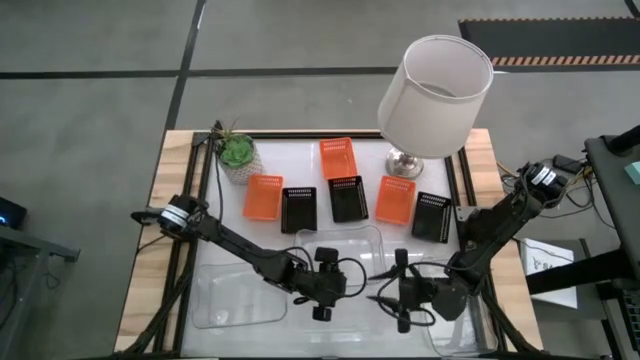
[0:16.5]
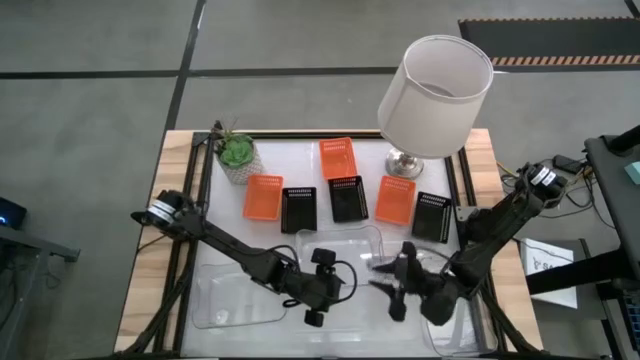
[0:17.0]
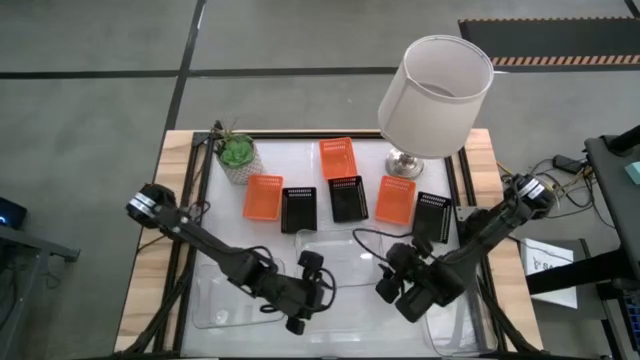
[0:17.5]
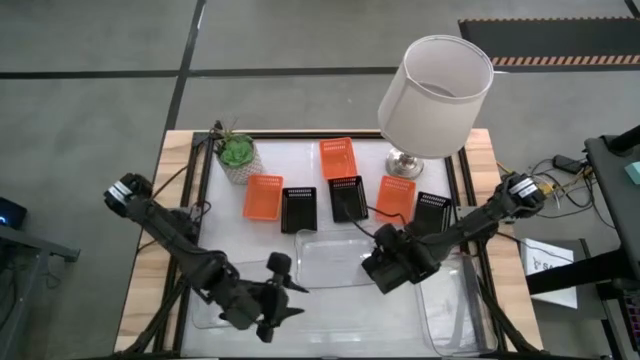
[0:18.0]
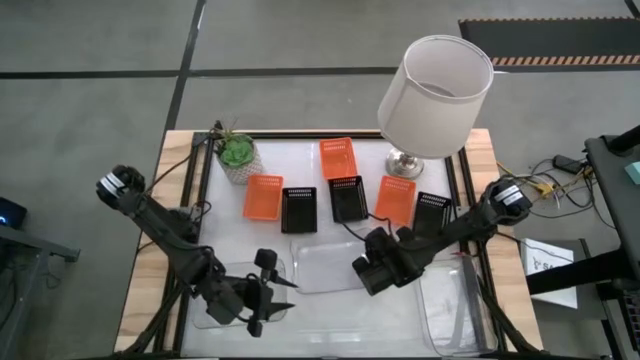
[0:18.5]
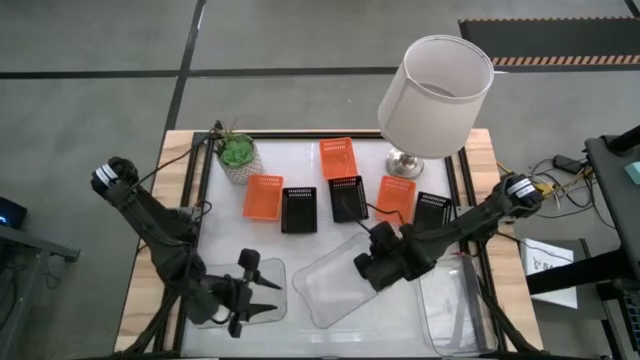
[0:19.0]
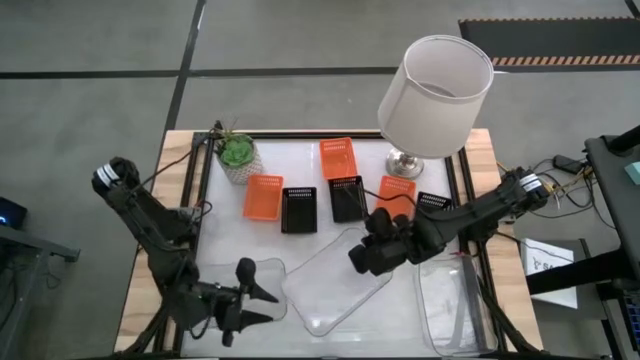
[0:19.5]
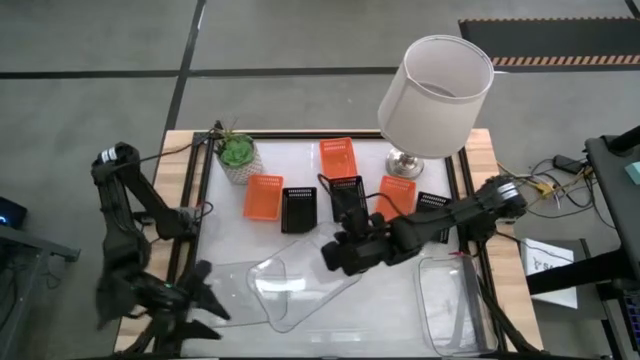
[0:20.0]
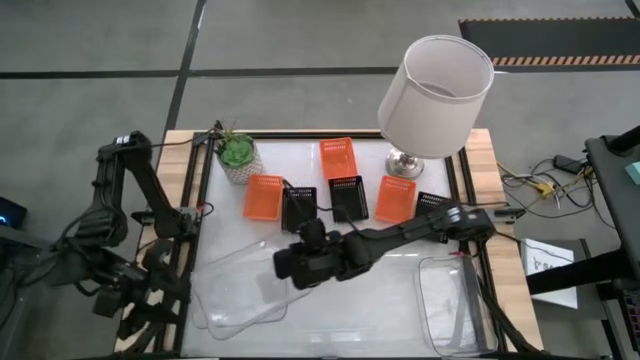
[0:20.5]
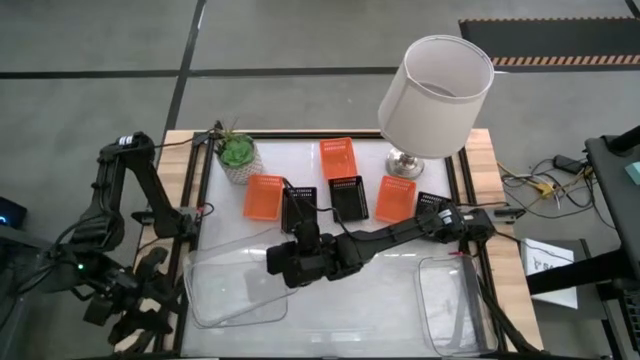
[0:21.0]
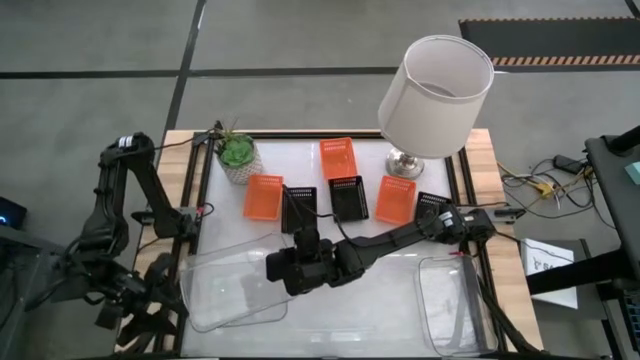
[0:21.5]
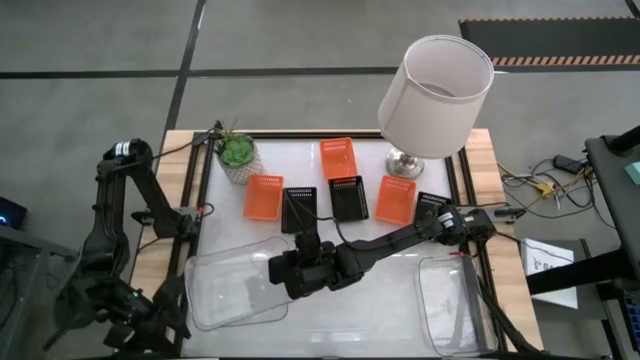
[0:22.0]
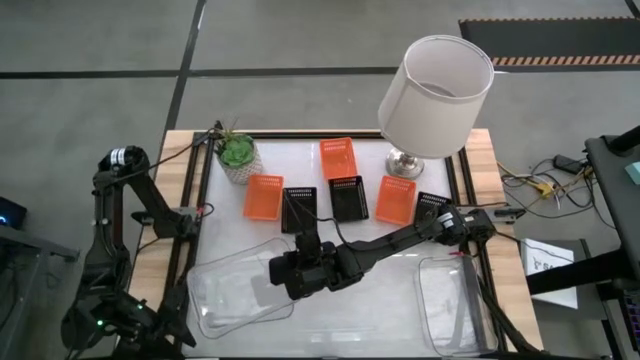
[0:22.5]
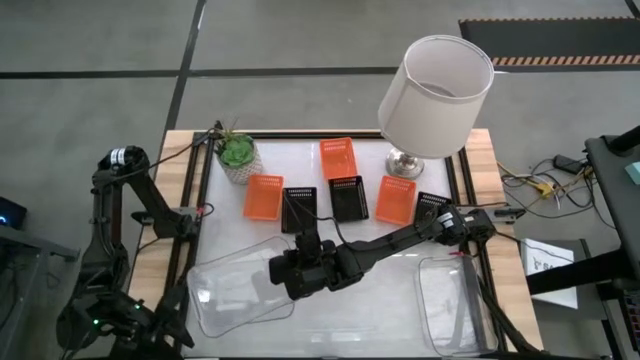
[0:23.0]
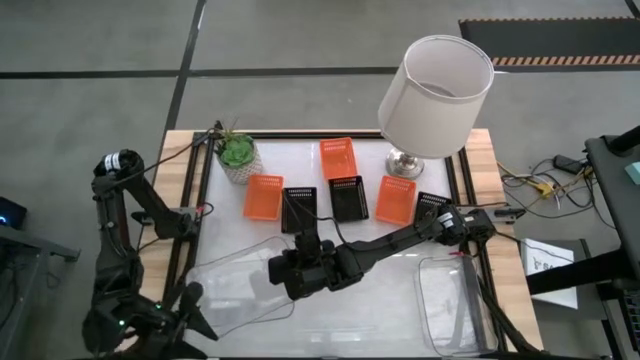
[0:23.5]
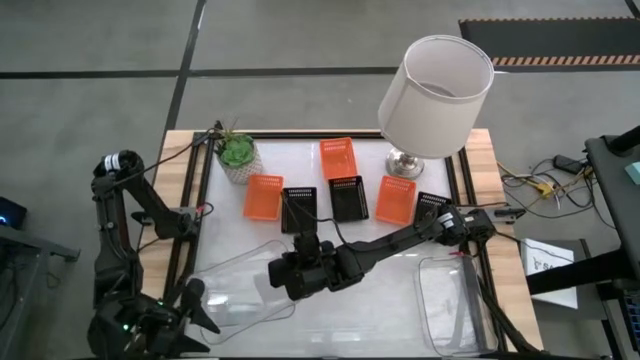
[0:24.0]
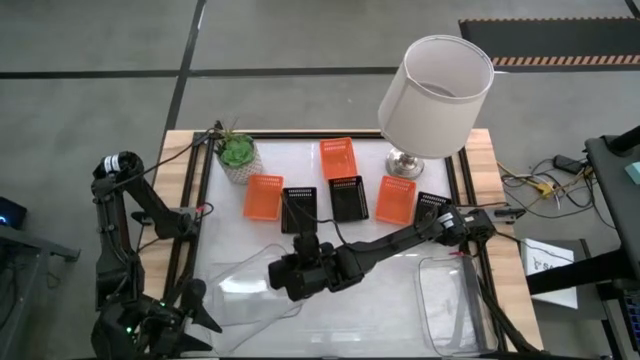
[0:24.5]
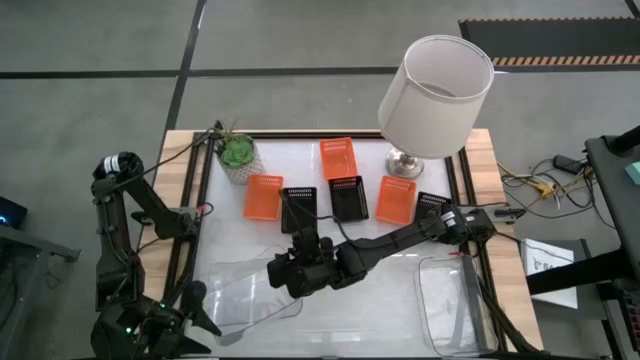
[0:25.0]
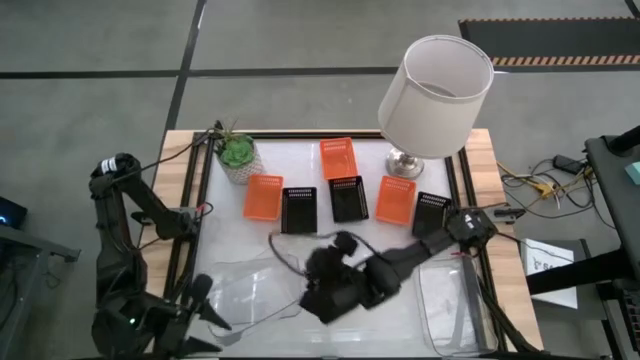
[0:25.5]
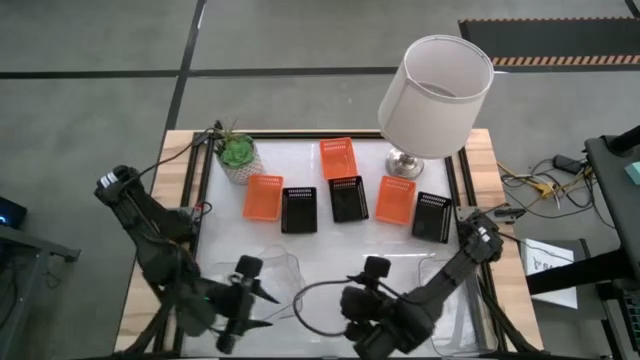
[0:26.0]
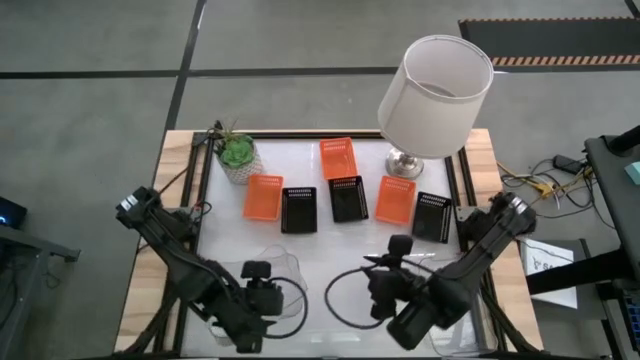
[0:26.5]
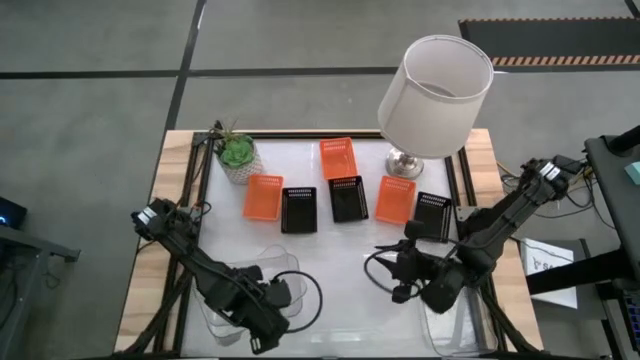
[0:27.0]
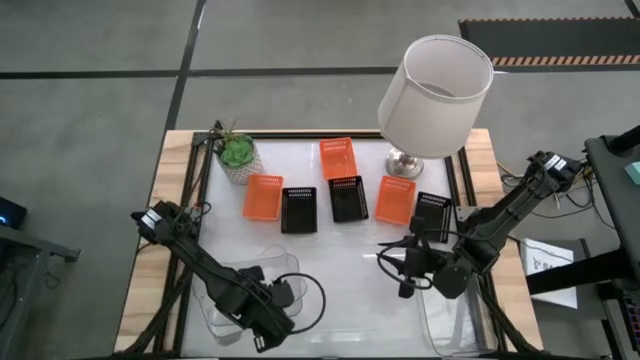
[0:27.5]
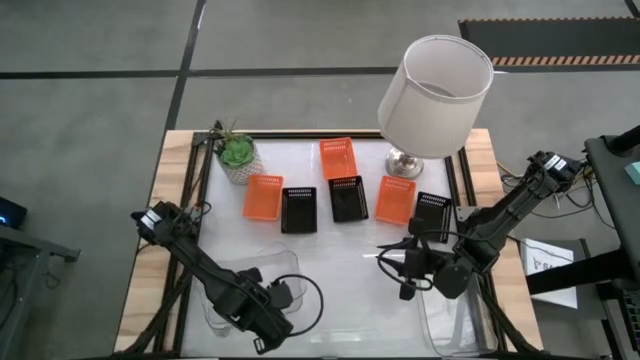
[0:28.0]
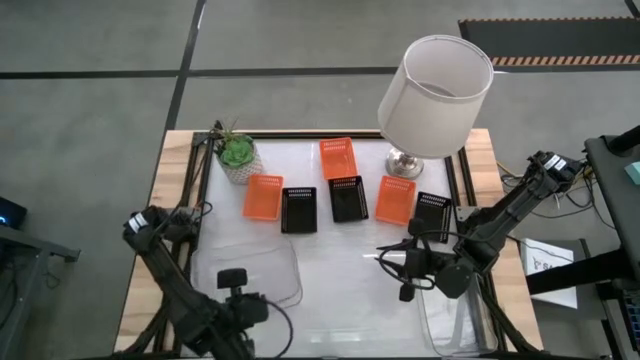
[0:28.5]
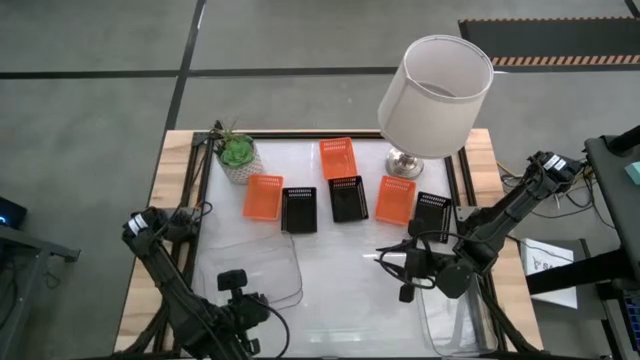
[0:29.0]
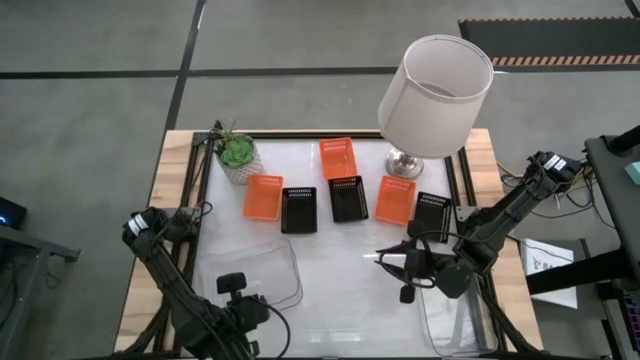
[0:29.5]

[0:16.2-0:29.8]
Stack the middle transparent bin on the left transparent bin

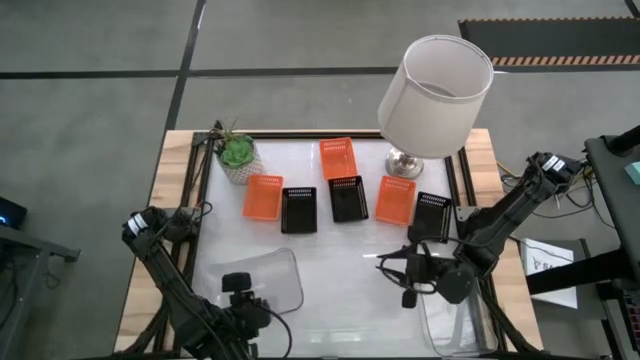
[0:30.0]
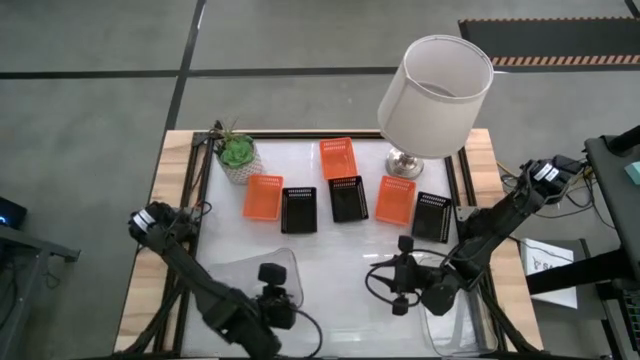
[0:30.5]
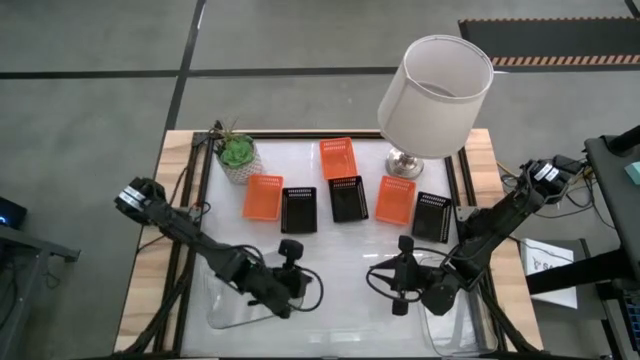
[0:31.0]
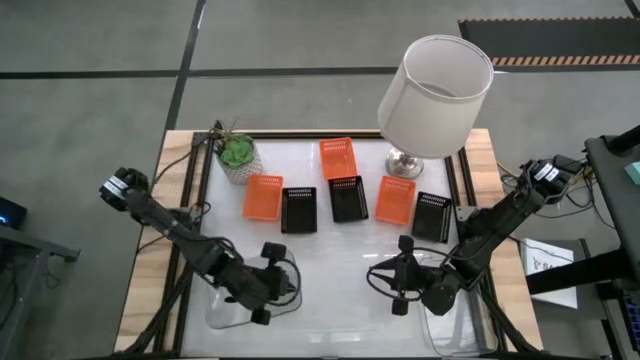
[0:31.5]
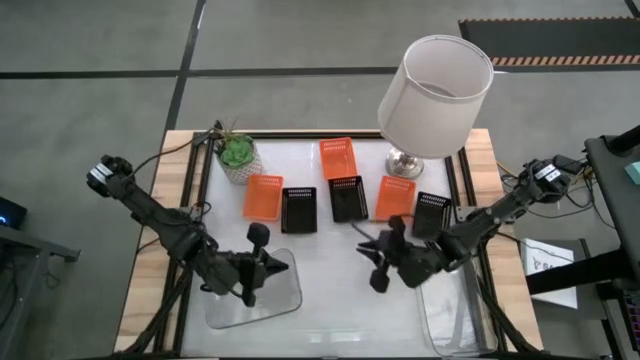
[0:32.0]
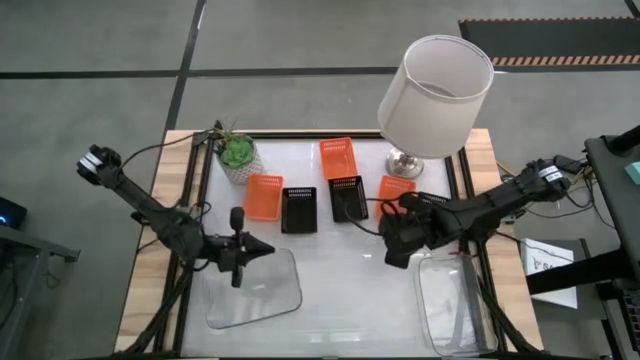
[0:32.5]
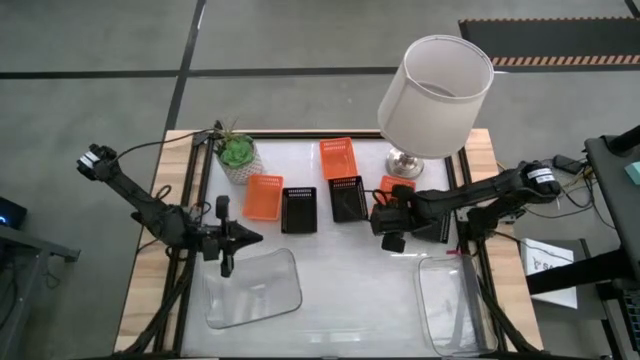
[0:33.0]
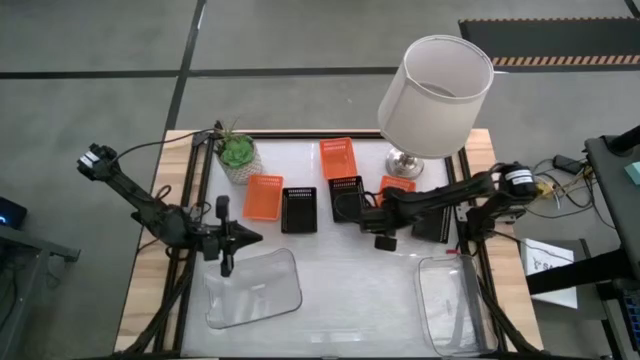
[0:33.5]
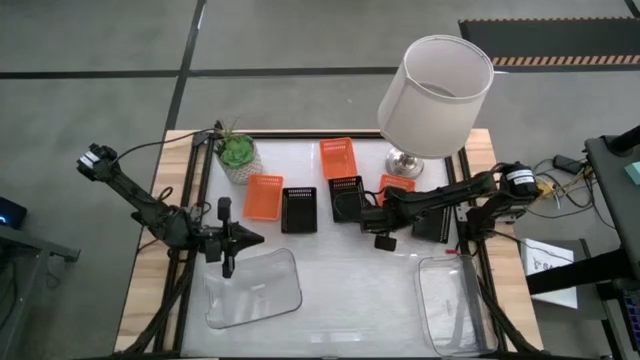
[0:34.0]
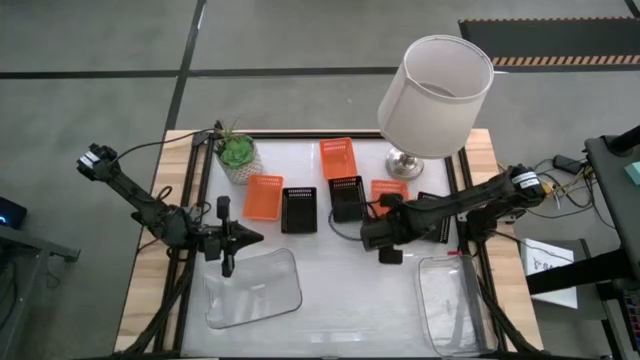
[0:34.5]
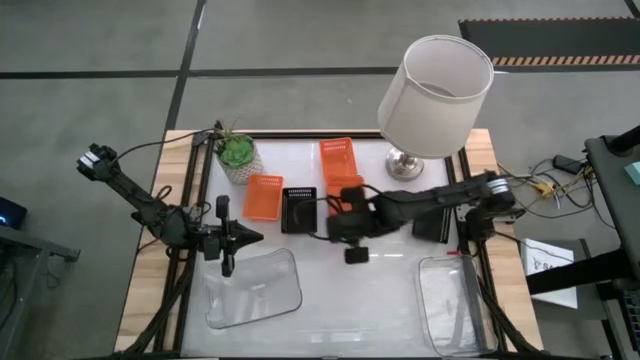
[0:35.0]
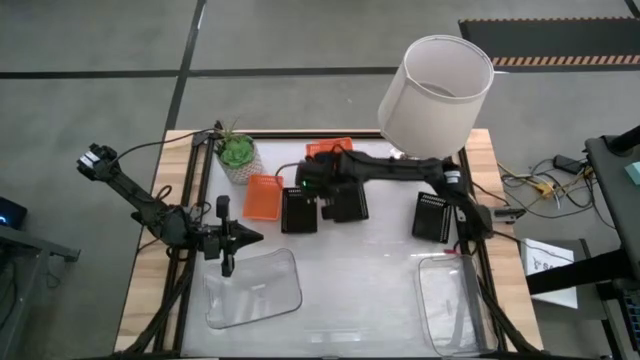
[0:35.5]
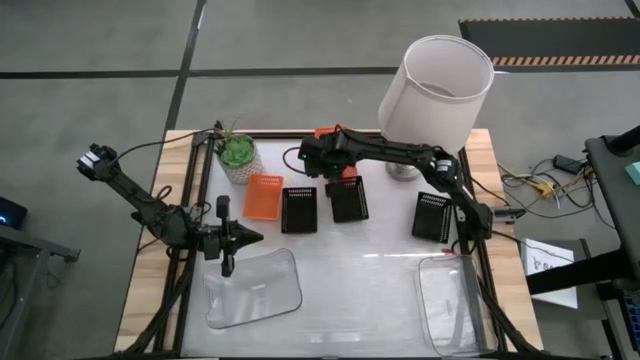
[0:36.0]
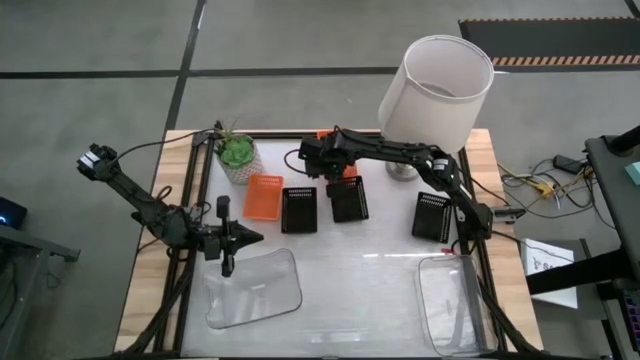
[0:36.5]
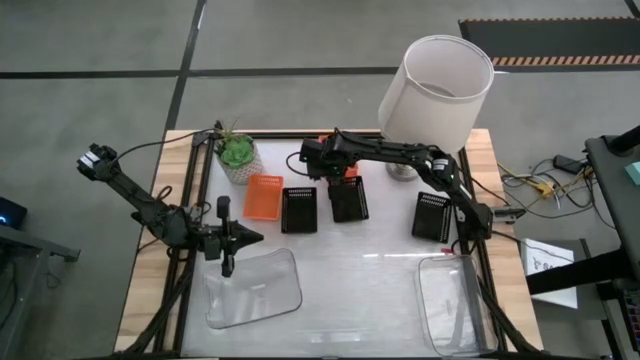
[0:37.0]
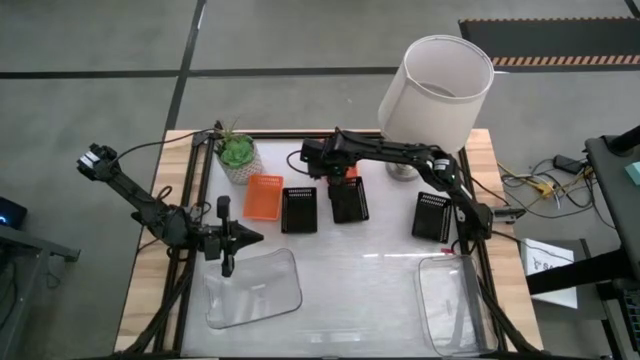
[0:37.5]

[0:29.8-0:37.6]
Stack the right orange bin on the top orange bin
